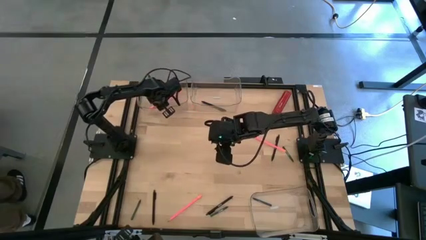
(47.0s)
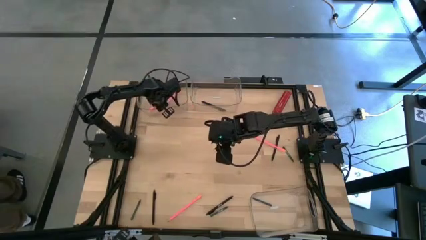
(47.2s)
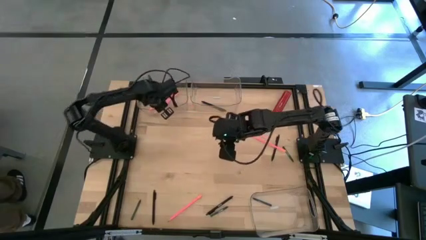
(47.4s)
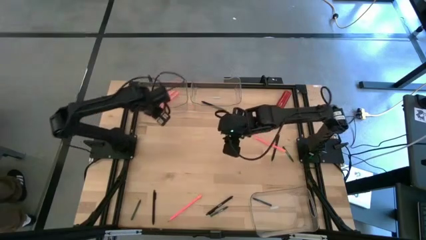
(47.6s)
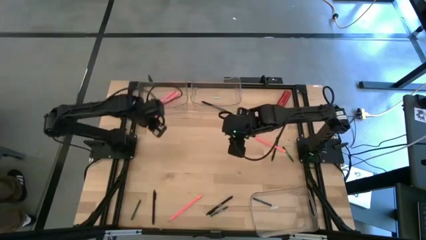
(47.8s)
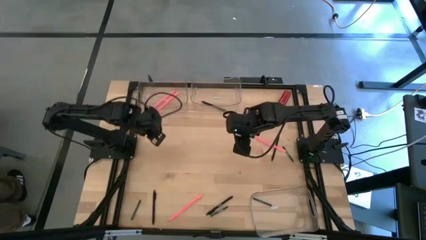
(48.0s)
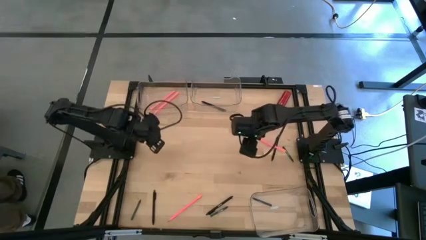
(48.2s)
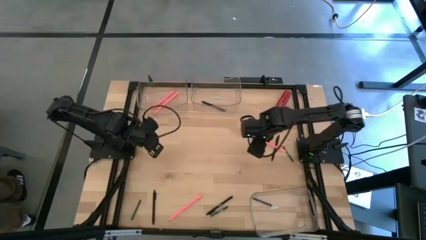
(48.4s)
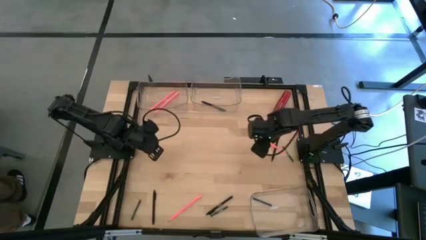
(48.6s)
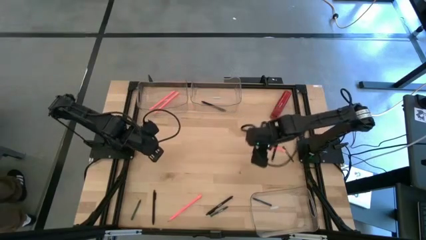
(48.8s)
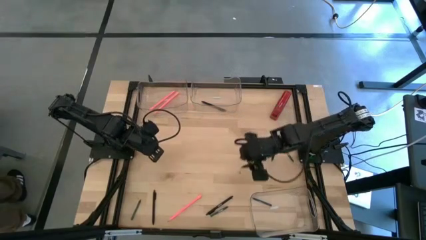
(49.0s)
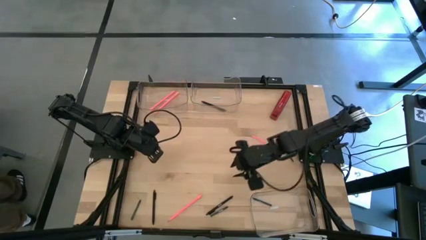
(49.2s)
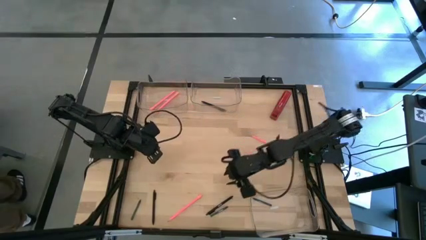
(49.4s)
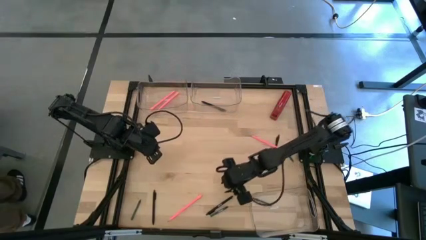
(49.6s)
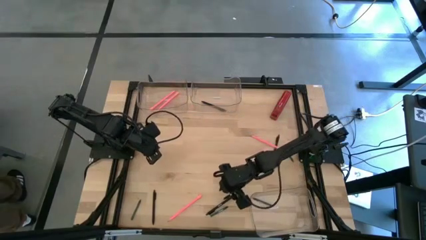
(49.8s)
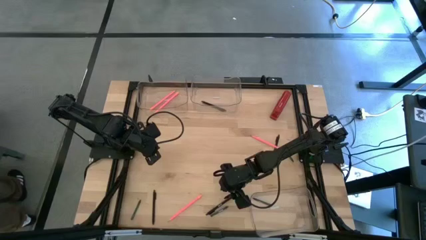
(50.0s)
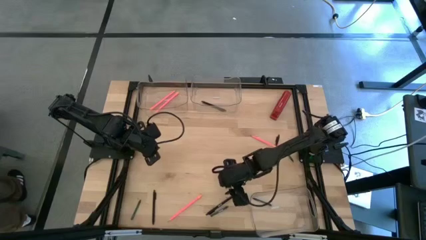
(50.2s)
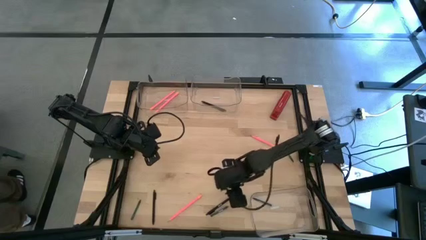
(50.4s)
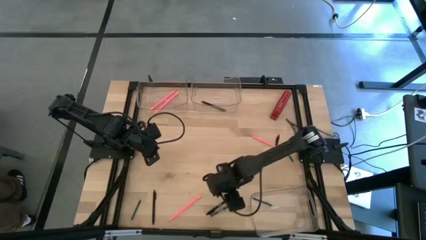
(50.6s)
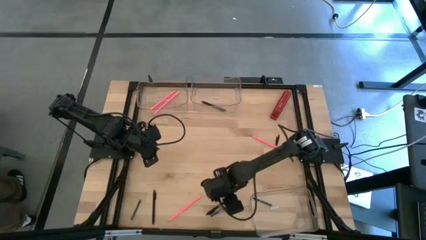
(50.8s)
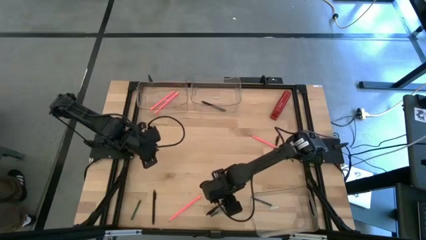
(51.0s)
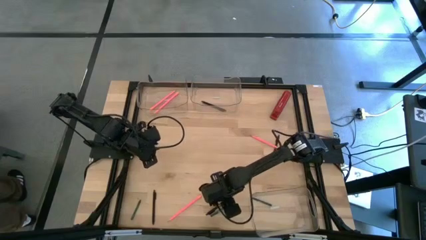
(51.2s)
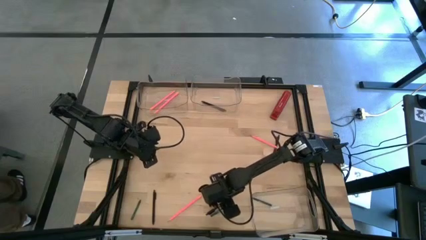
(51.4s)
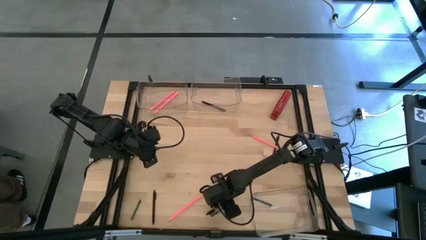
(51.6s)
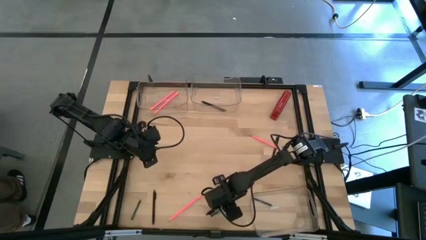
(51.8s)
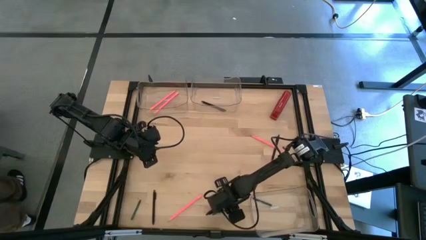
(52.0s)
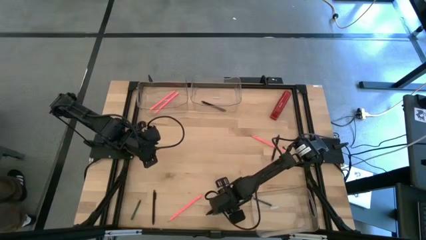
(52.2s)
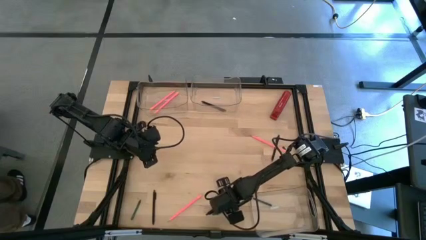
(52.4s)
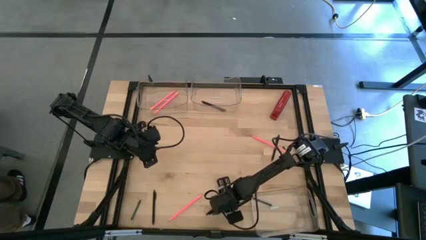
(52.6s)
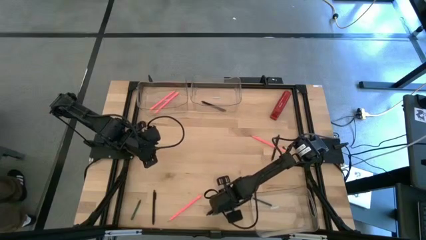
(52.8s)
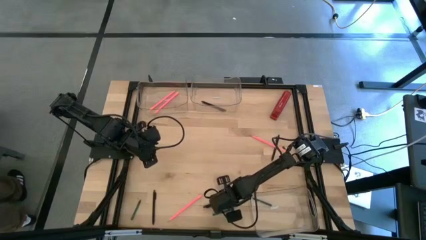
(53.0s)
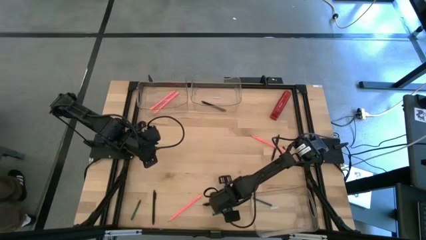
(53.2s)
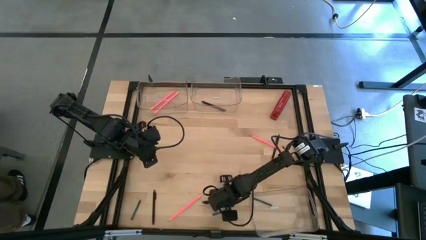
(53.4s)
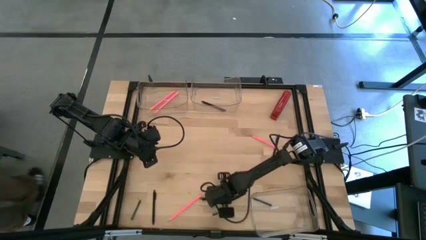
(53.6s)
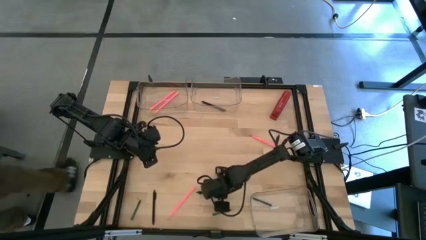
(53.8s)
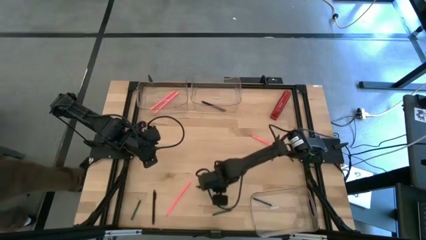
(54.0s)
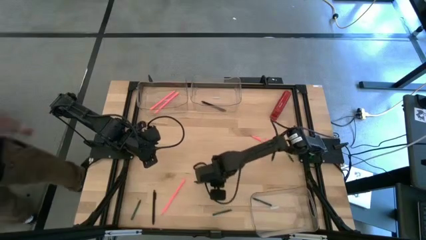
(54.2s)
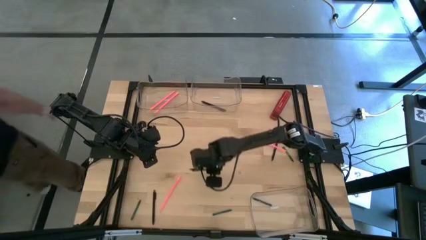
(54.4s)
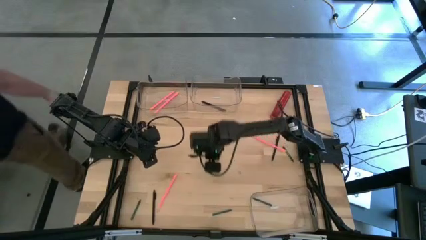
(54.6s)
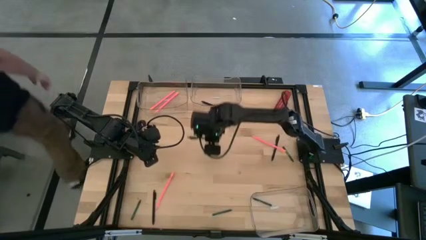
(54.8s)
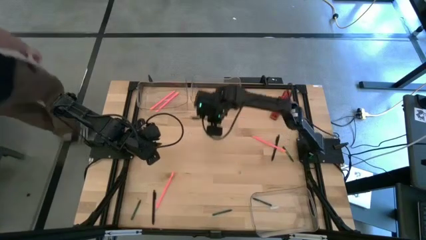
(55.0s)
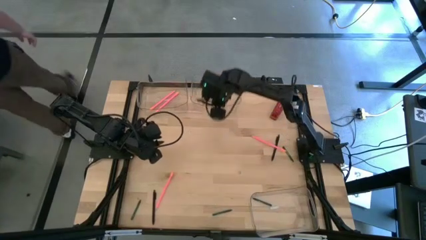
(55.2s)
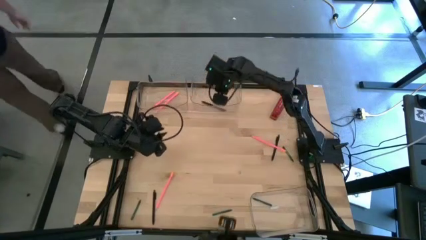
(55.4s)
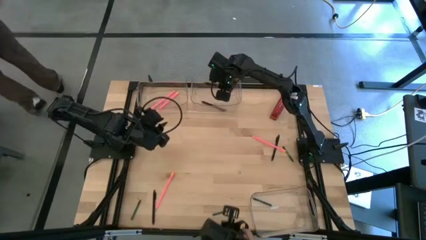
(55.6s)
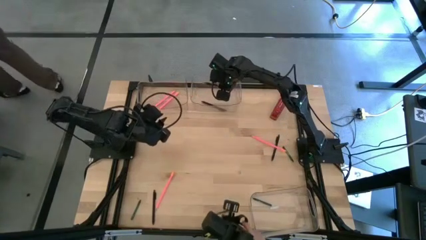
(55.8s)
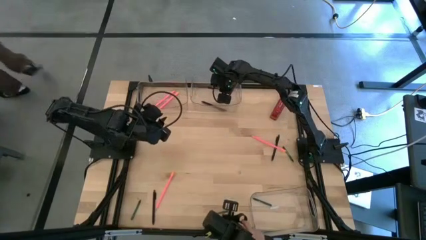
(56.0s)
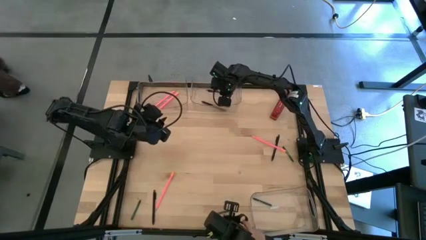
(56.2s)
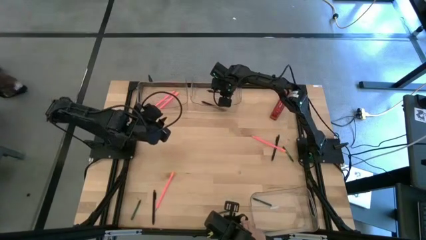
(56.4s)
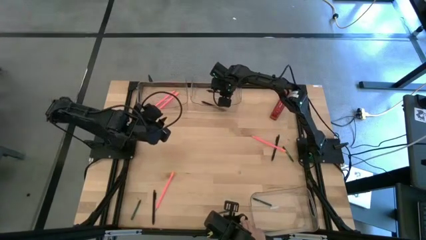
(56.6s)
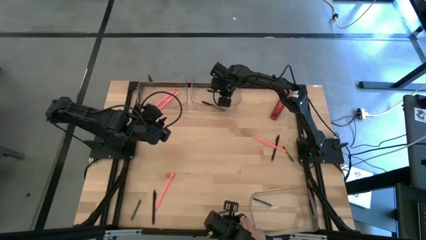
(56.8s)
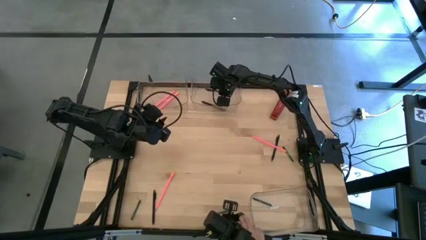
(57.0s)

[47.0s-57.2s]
Task: Sort crayons/erasers/pens/pencils in bins
Put the black pen into the top right transparent bin

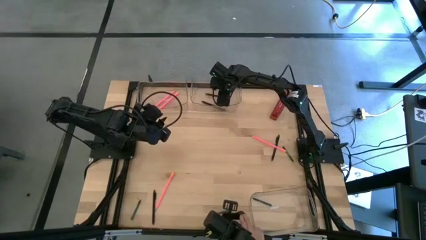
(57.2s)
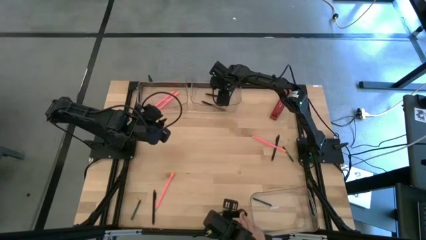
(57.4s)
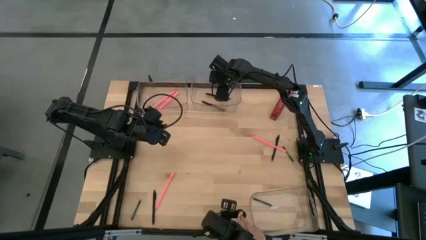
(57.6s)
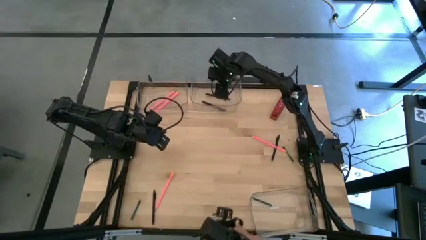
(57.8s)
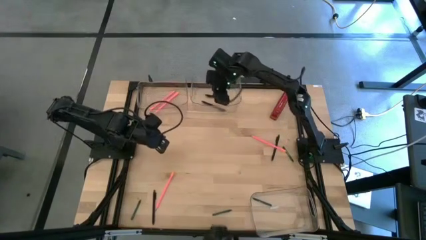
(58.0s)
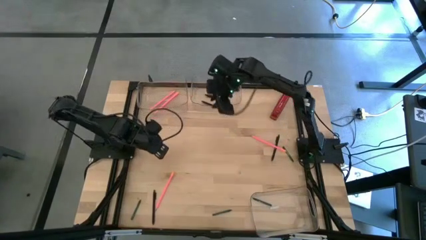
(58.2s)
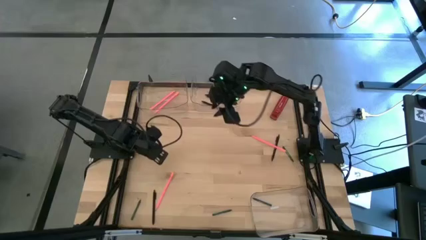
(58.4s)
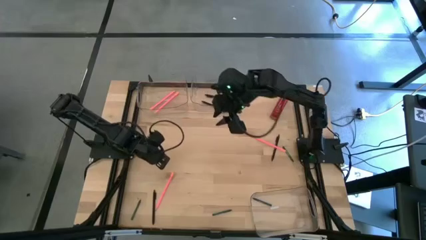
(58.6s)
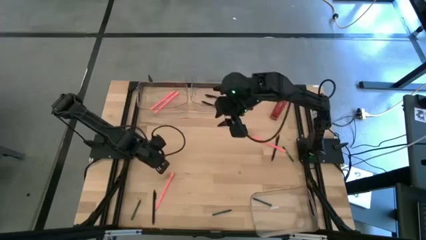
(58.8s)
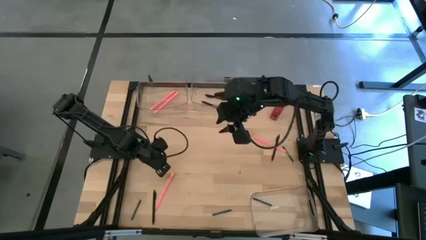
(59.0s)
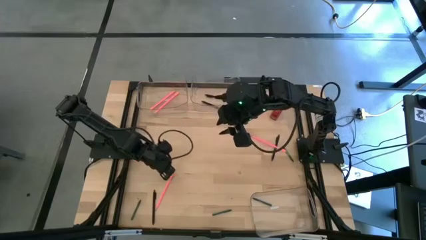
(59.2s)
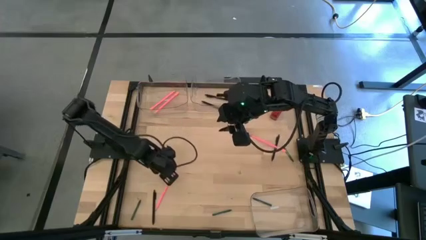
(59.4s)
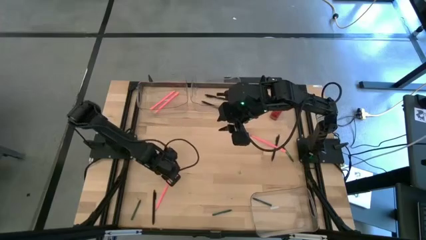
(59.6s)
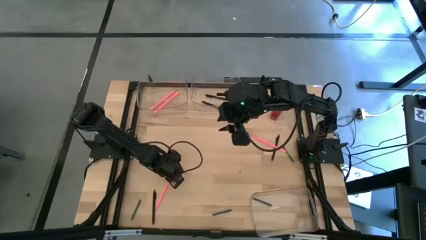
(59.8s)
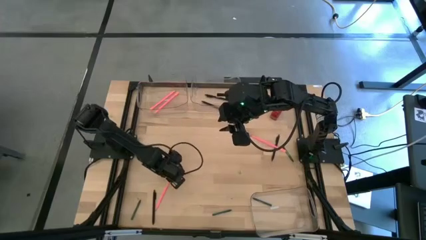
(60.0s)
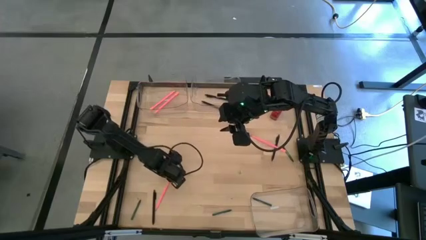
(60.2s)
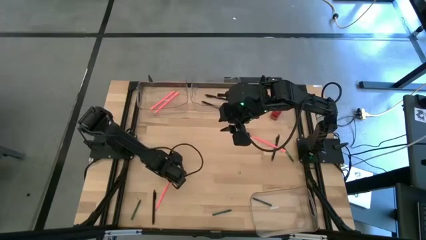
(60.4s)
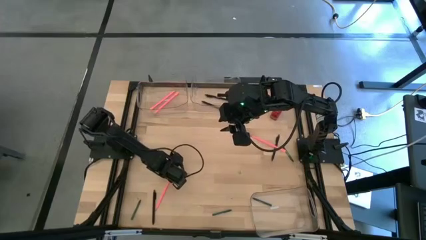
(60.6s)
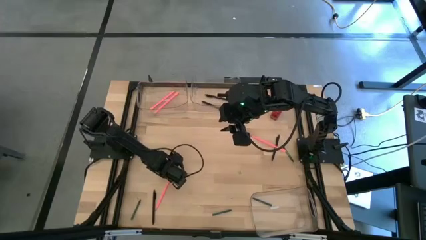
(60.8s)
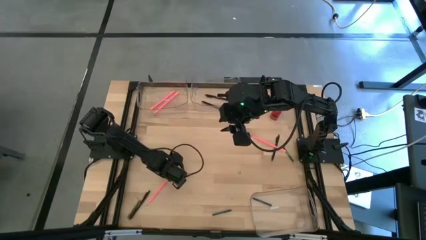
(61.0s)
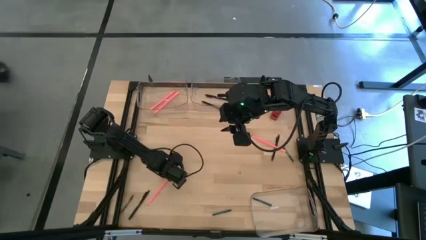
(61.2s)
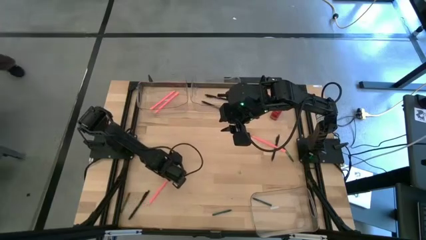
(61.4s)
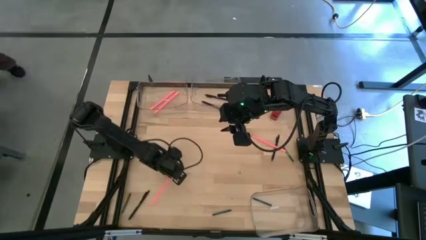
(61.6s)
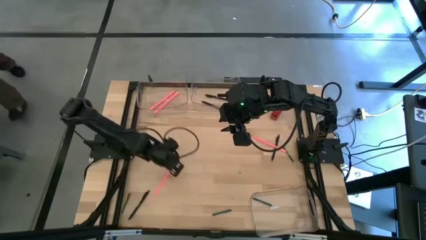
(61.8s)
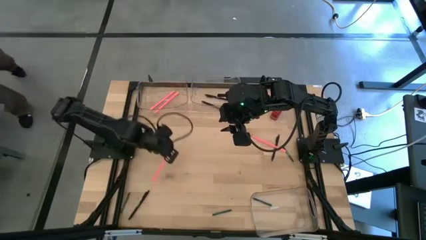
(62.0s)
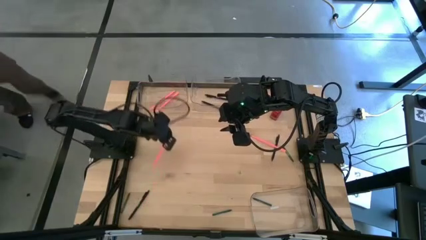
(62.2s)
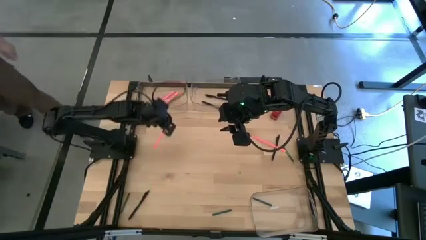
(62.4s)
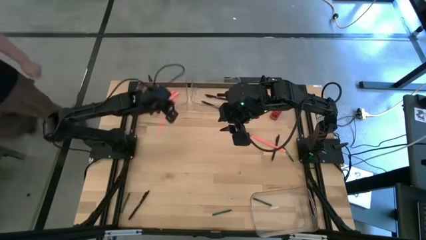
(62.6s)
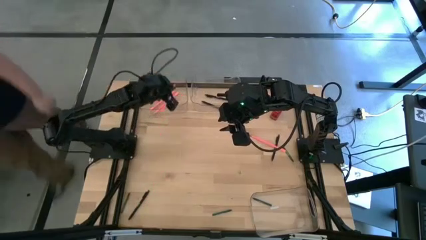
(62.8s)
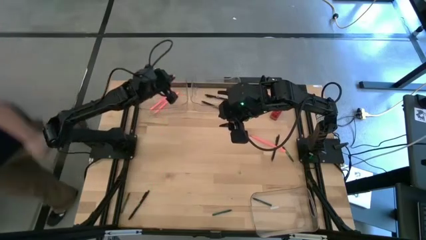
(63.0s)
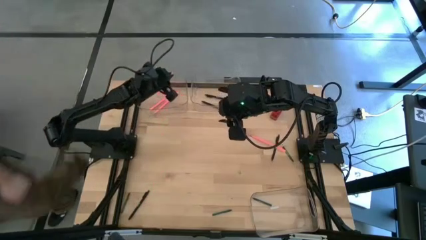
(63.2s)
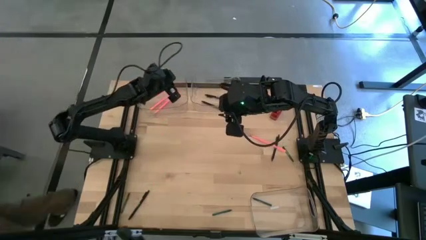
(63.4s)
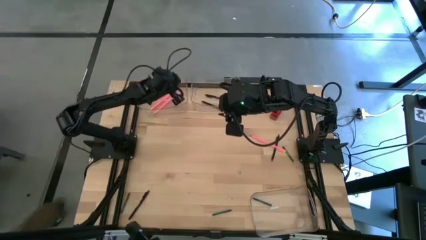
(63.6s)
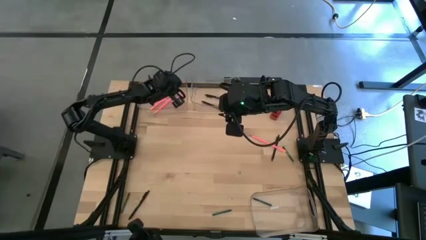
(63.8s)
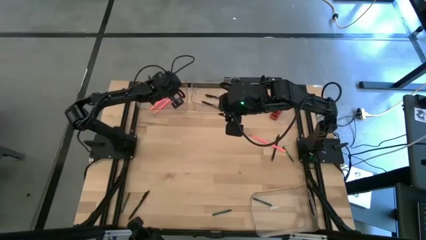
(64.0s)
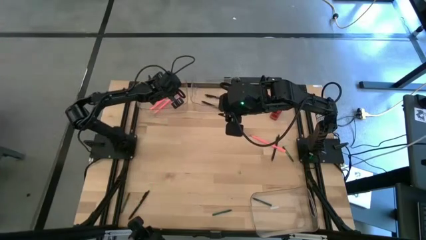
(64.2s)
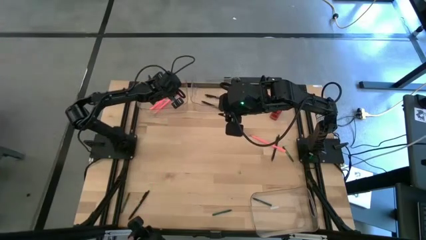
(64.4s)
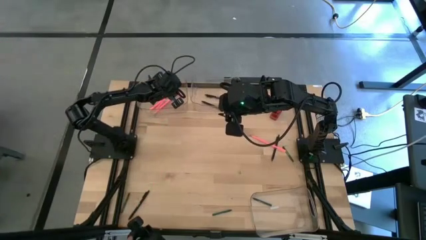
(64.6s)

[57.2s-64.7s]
Put the pink pencil into the top left transparent bin
